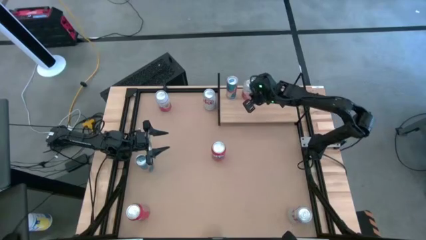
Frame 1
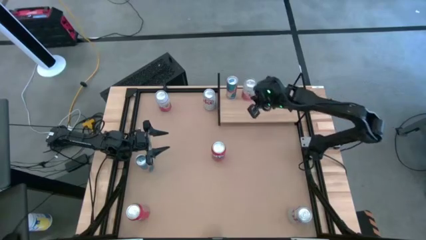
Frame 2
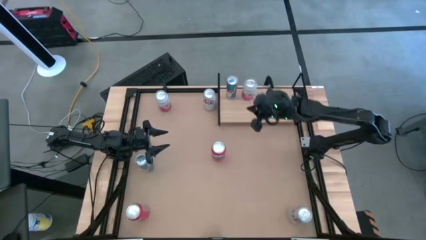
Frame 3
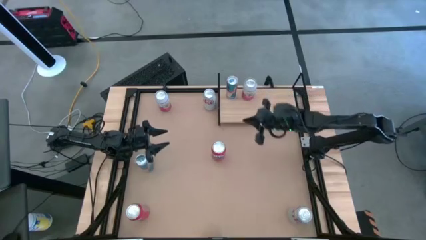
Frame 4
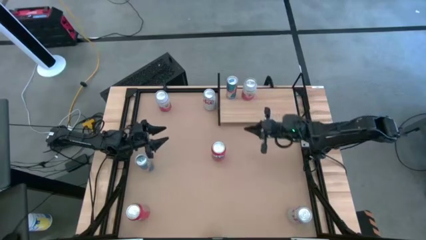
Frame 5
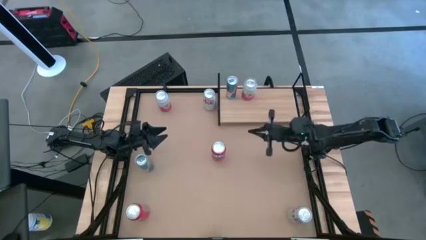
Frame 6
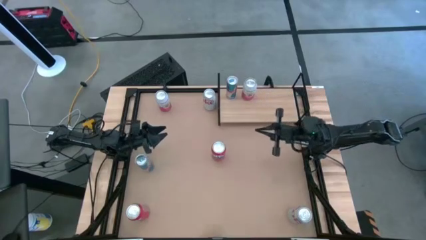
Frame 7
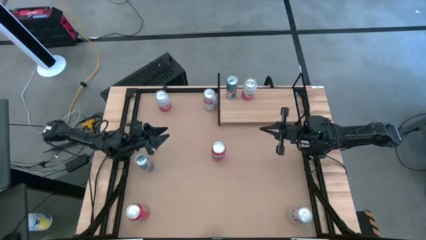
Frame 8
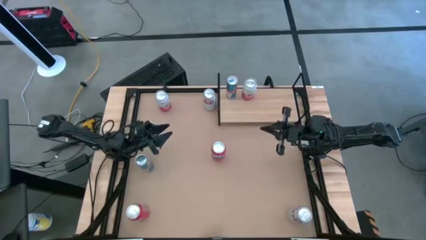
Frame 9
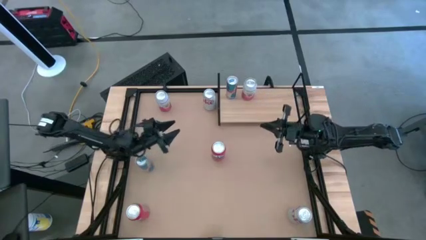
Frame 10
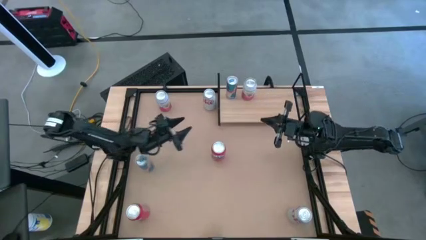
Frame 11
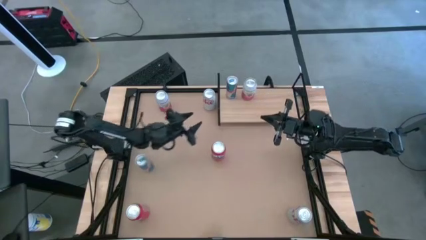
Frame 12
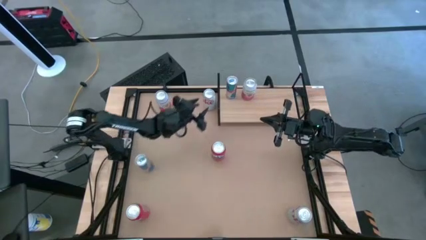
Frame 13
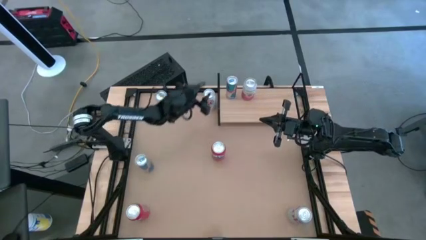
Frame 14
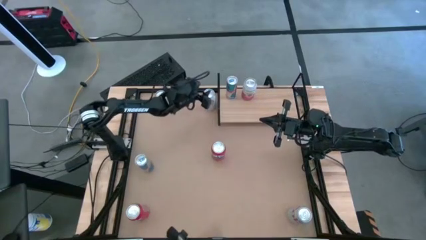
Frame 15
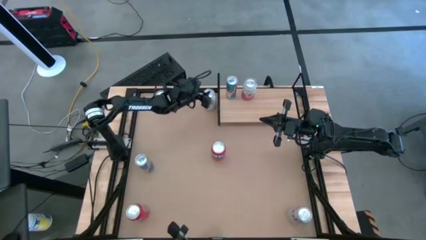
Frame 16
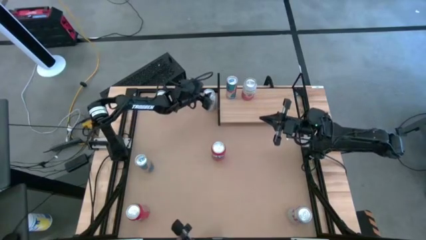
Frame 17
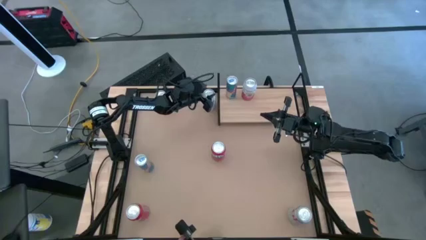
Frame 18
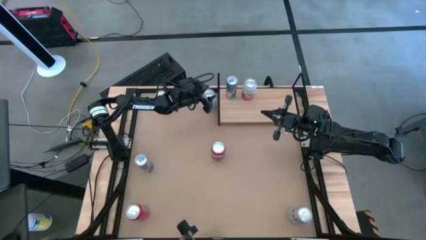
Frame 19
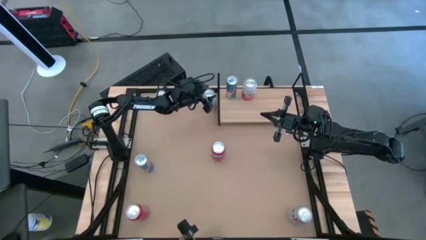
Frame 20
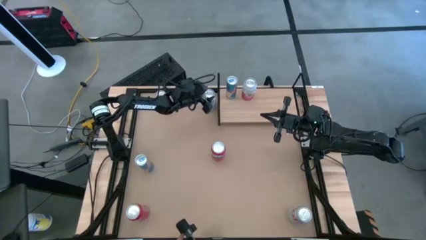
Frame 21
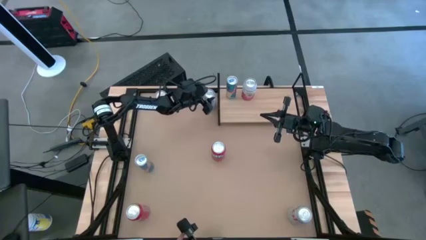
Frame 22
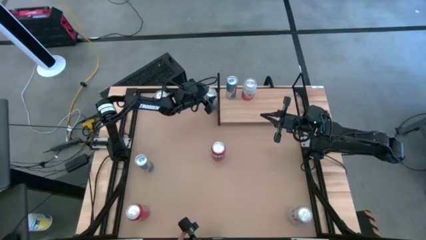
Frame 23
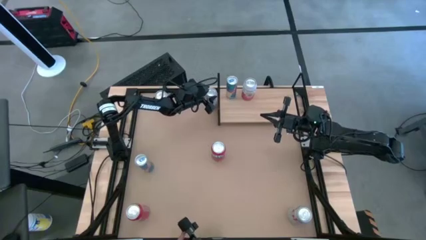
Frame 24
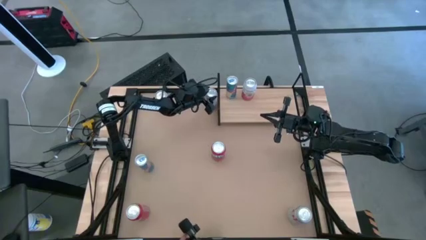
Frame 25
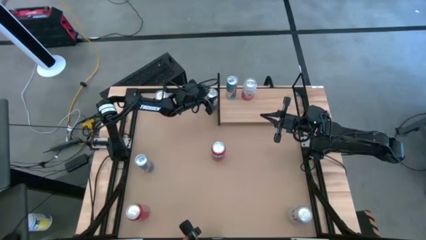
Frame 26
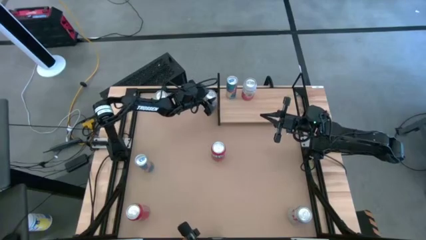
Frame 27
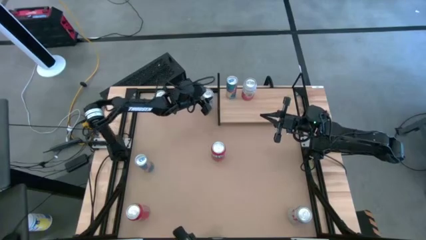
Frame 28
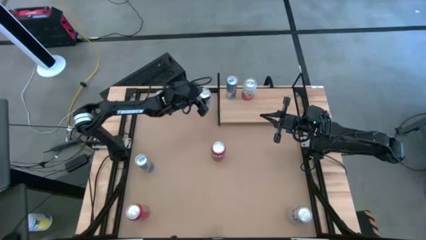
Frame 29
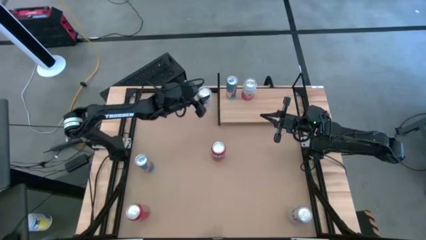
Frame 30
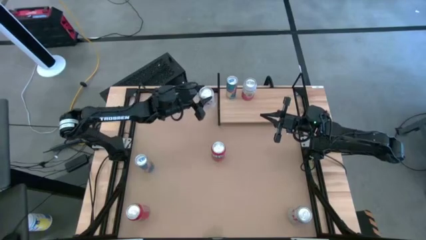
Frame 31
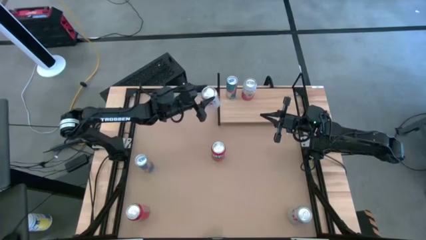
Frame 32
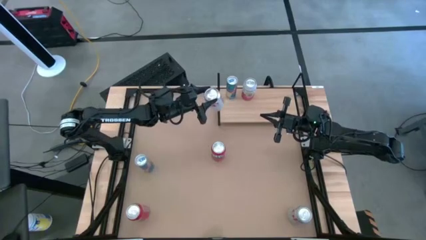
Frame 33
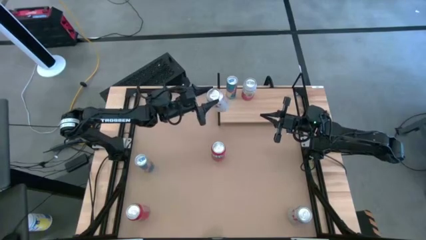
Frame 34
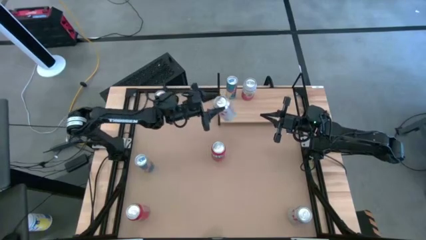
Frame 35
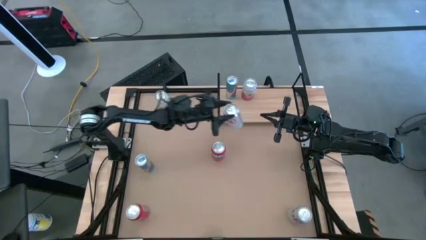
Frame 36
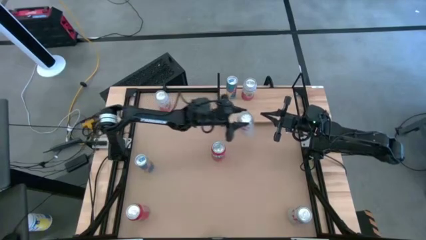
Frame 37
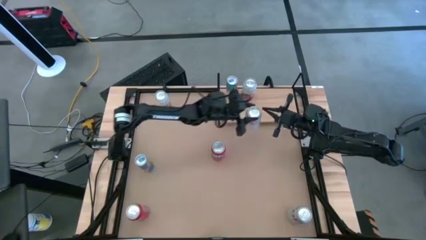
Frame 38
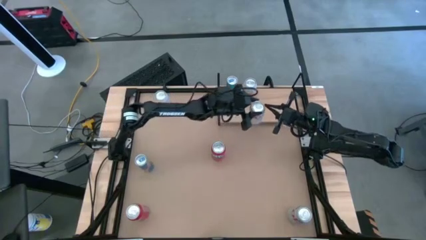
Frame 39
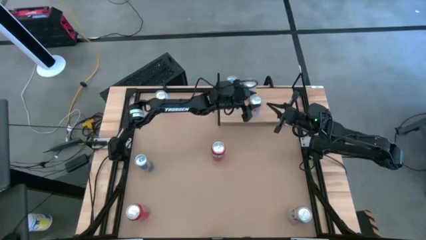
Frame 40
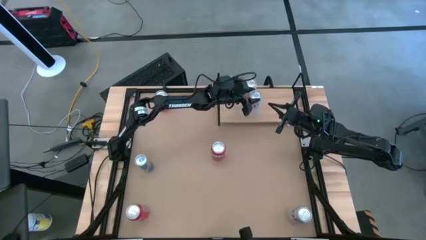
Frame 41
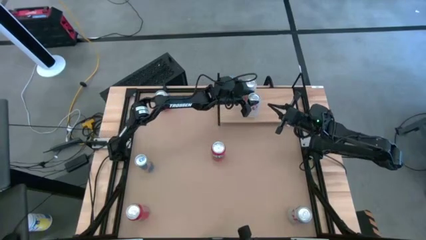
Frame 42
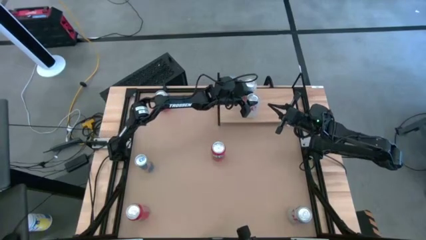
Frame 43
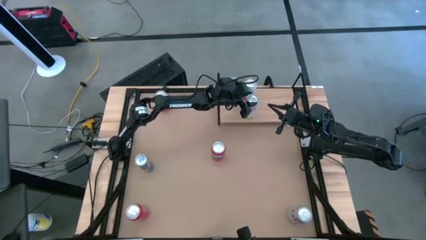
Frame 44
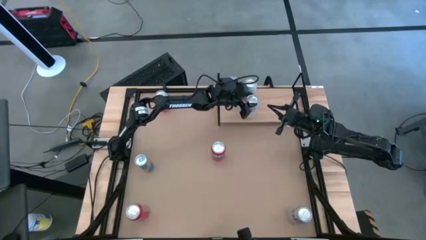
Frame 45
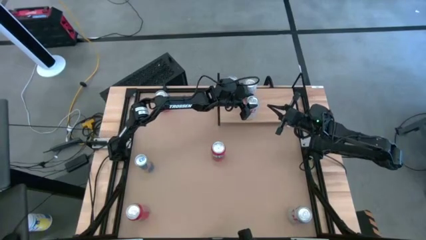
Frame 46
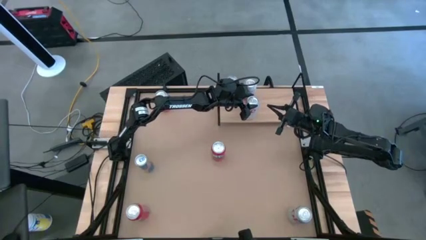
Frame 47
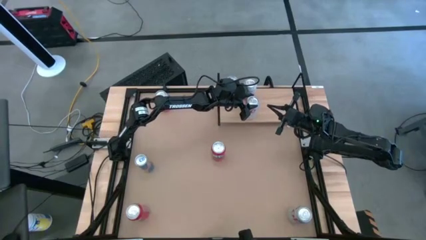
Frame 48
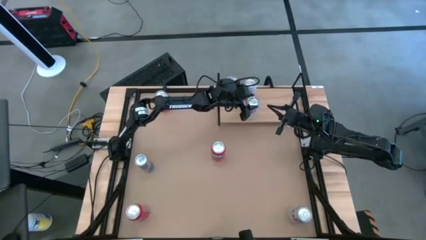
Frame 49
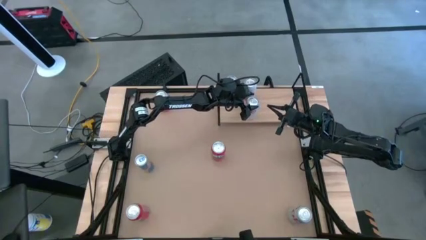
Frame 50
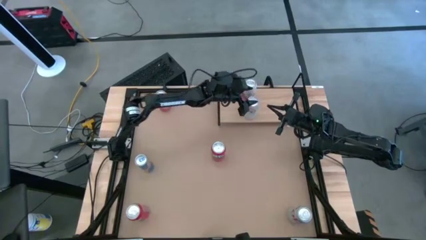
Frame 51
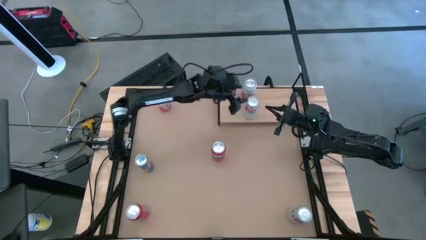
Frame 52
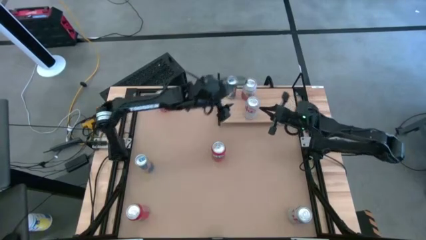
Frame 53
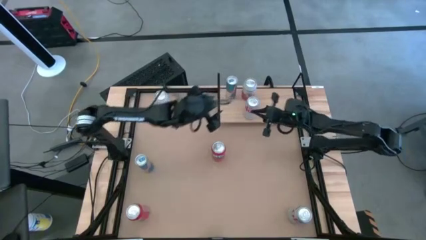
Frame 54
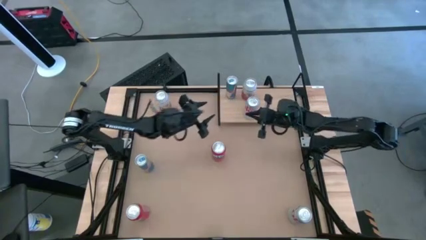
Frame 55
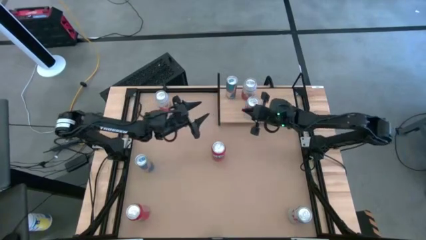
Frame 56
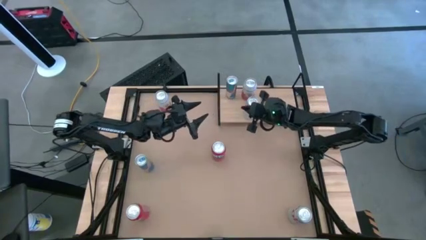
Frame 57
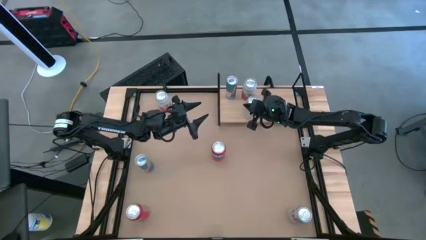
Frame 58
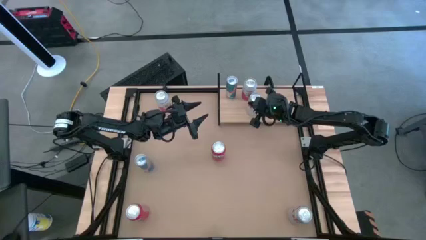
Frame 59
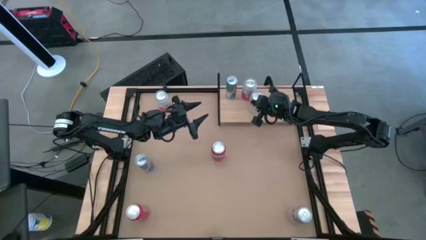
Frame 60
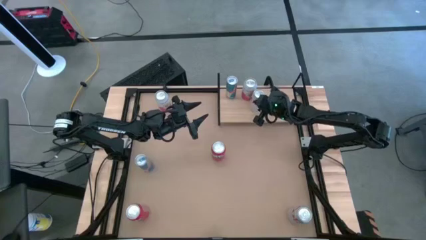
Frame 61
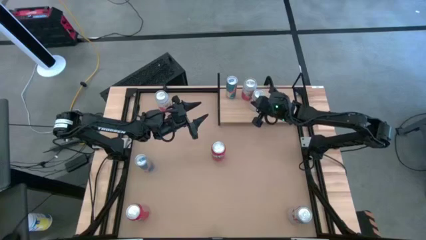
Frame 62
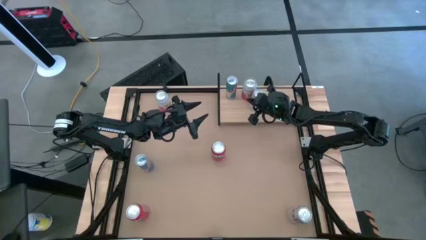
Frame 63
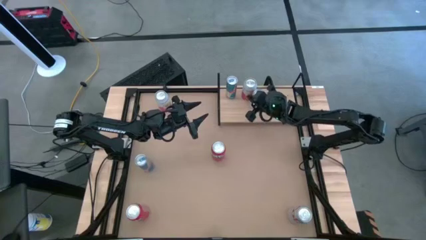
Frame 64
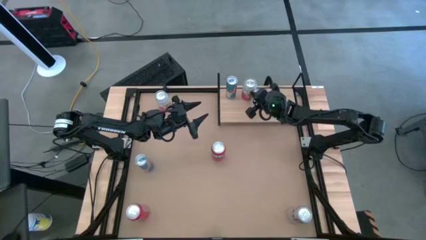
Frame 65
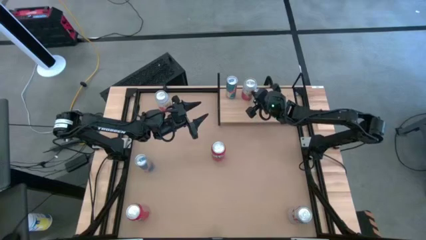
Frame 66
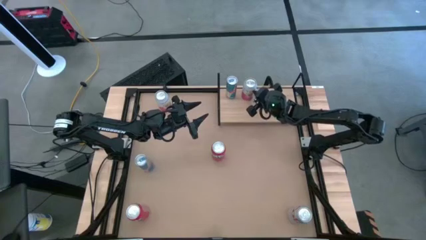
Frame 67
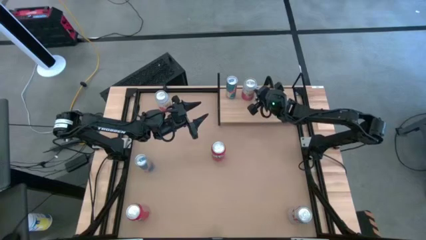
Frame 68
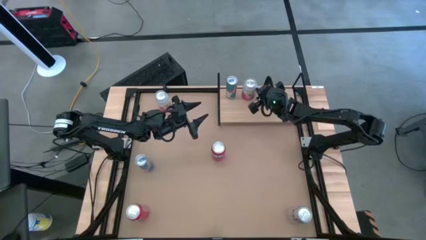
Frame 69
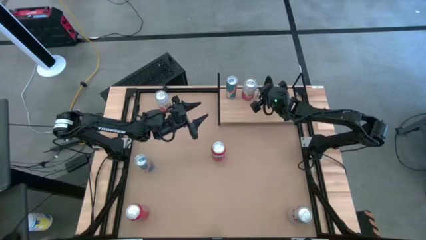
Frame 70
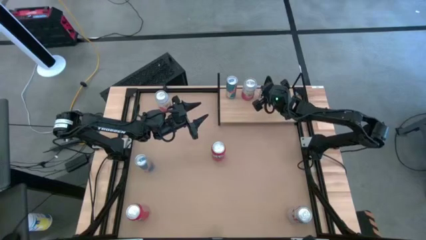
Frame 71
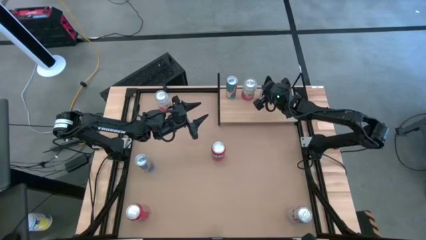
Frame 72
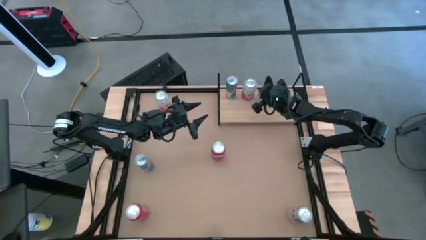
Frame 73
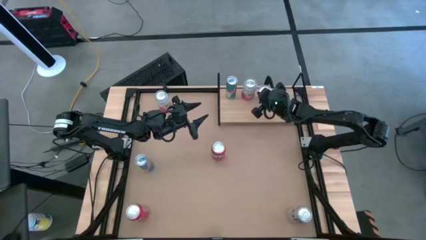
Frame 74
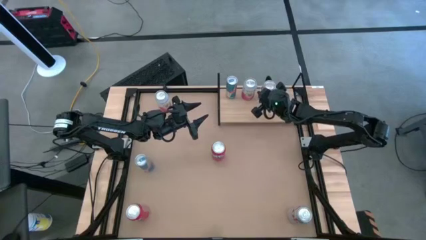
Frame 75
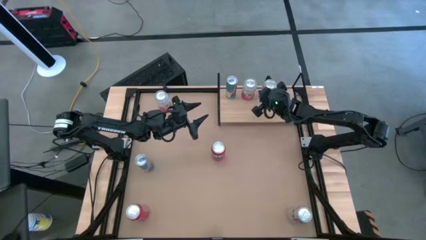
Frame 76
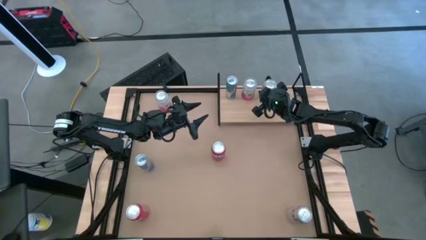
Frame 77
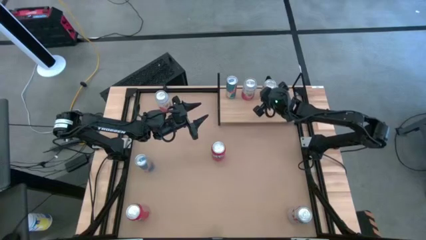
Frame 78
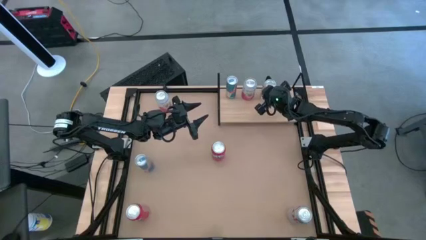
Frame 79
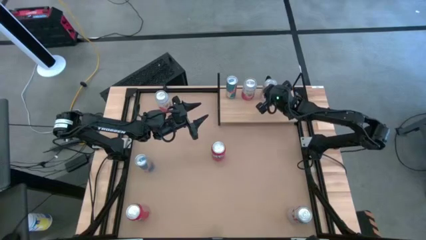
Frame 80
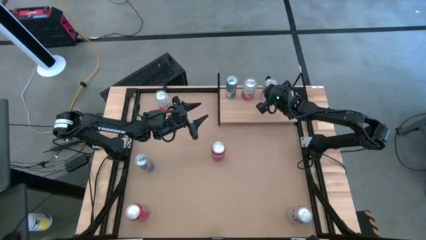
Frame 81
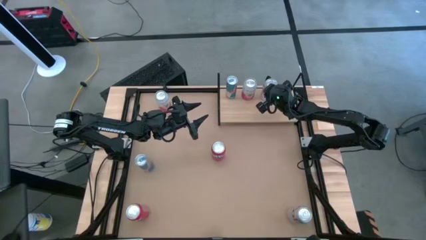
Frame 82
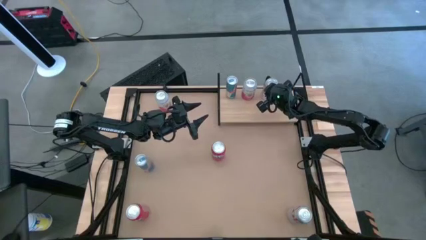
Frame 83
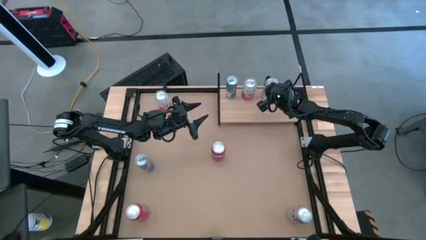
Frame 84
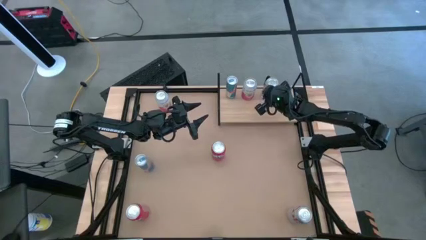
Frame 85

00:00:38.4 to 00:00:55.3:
Task: Place canned beverage on shelf
Put the top red-silver soda can on the shelf
